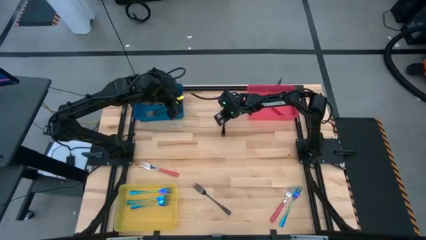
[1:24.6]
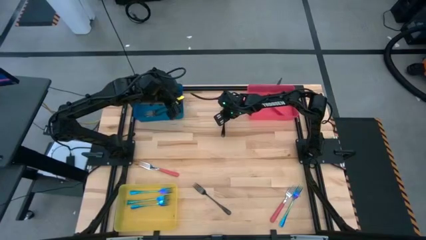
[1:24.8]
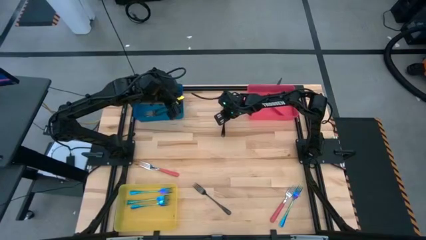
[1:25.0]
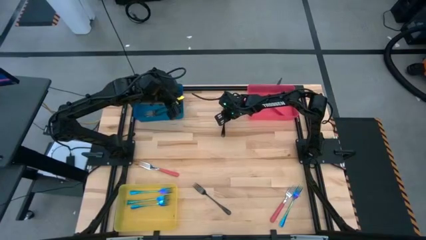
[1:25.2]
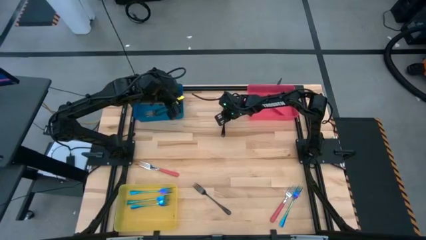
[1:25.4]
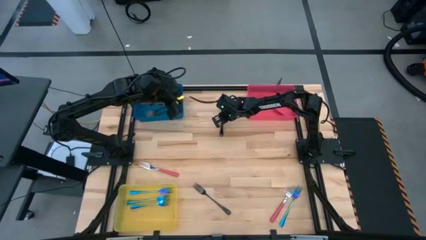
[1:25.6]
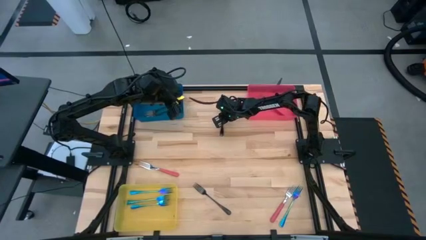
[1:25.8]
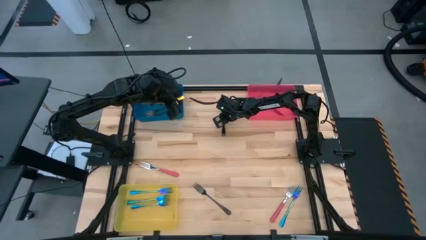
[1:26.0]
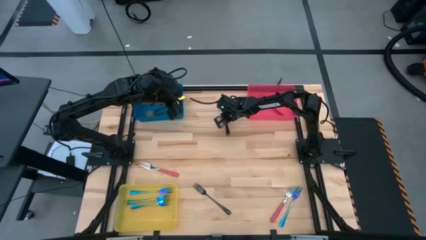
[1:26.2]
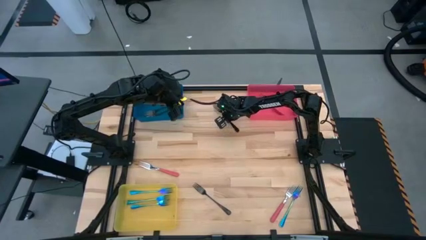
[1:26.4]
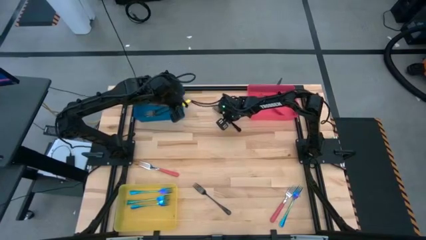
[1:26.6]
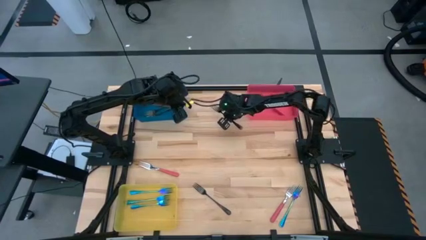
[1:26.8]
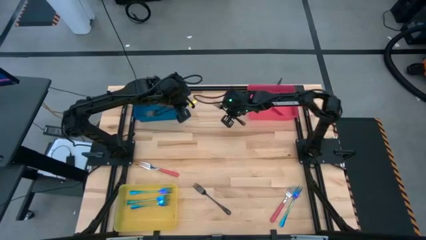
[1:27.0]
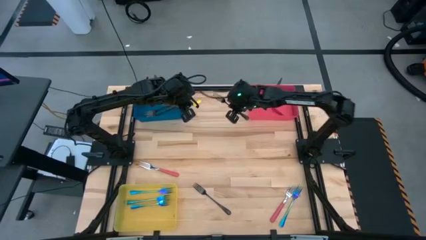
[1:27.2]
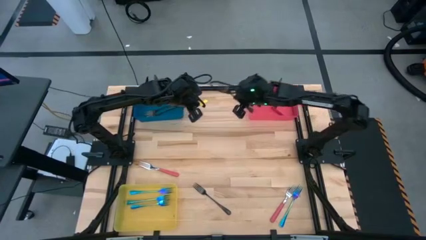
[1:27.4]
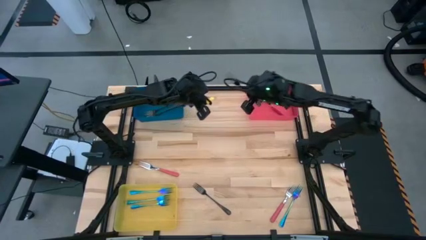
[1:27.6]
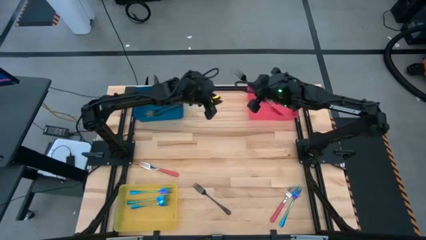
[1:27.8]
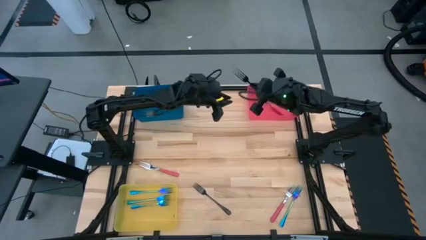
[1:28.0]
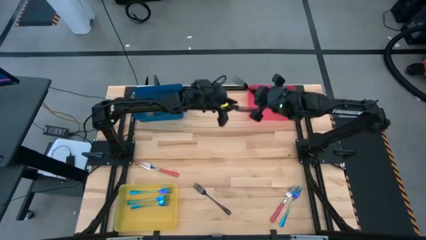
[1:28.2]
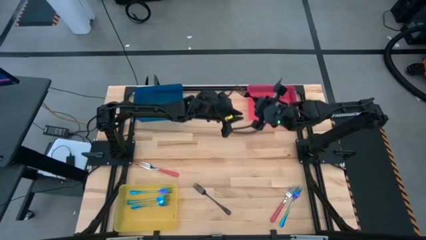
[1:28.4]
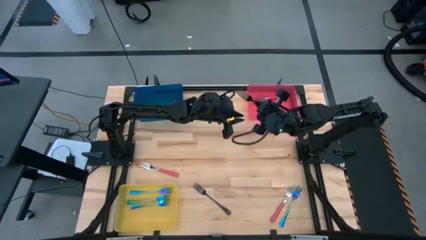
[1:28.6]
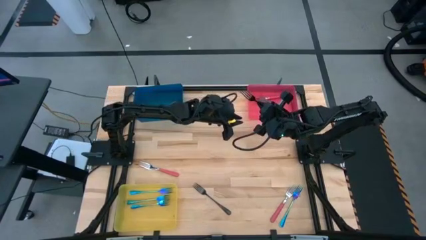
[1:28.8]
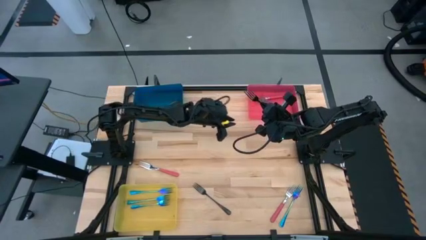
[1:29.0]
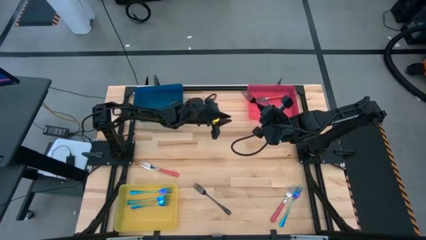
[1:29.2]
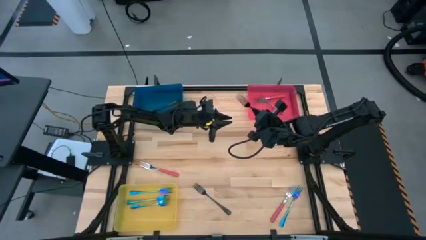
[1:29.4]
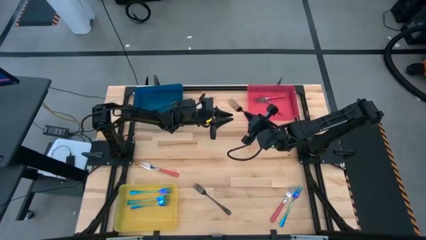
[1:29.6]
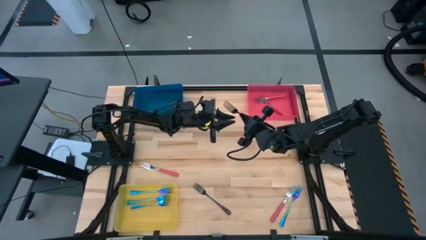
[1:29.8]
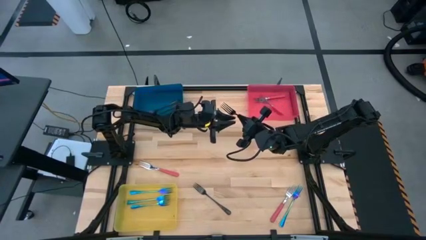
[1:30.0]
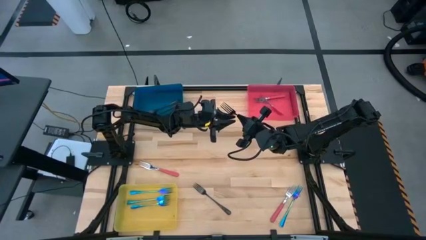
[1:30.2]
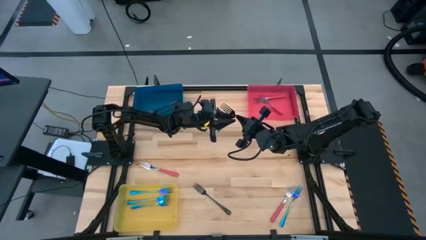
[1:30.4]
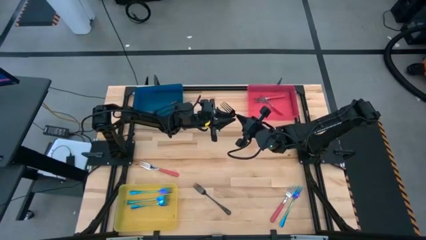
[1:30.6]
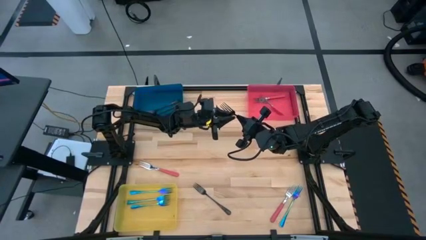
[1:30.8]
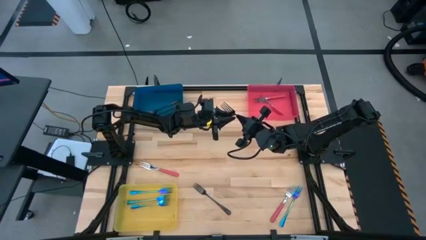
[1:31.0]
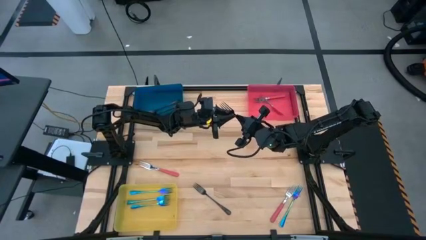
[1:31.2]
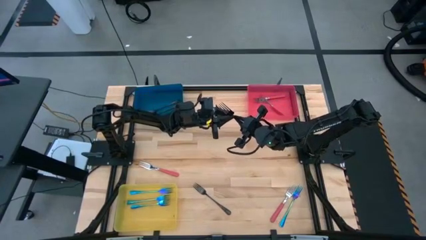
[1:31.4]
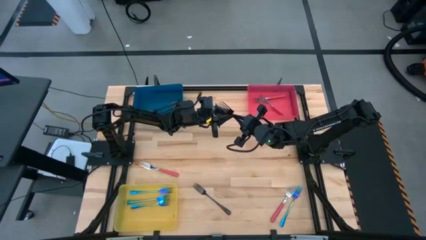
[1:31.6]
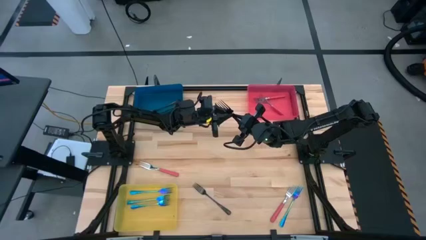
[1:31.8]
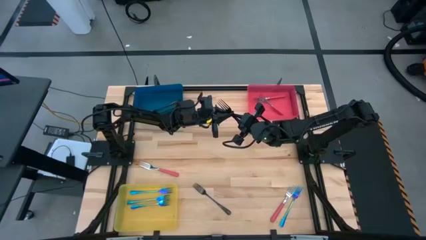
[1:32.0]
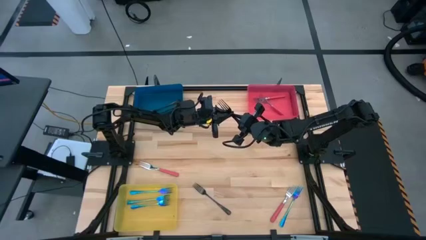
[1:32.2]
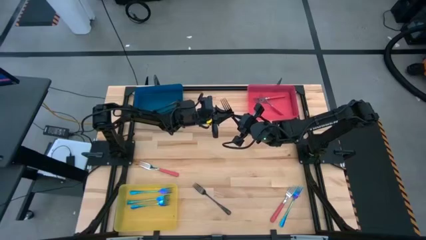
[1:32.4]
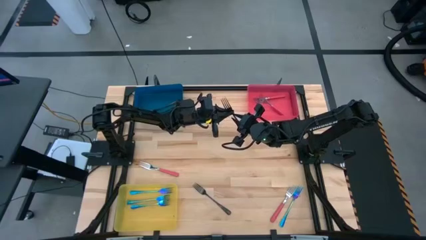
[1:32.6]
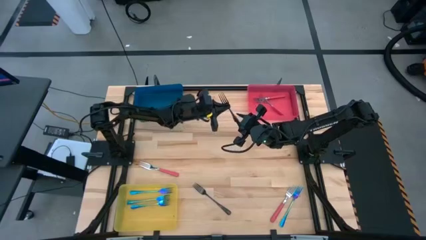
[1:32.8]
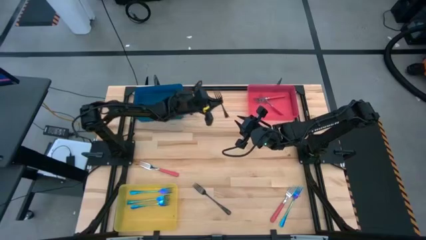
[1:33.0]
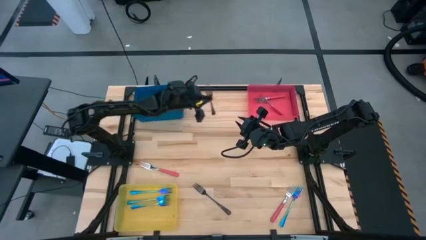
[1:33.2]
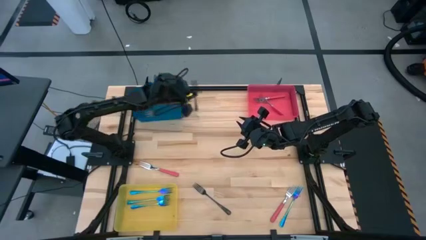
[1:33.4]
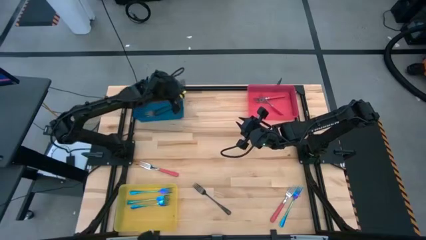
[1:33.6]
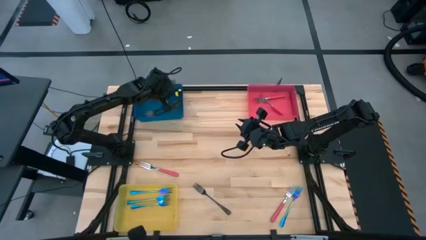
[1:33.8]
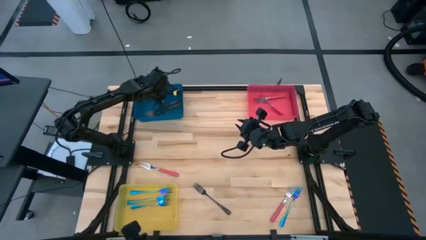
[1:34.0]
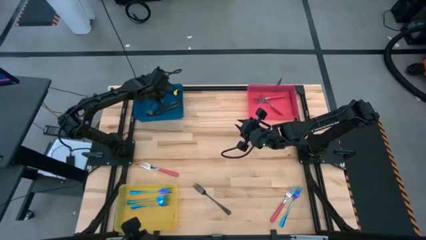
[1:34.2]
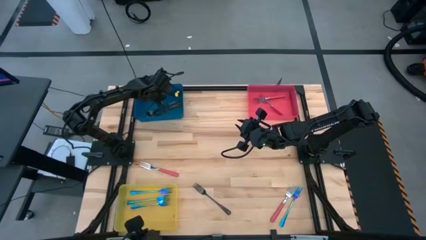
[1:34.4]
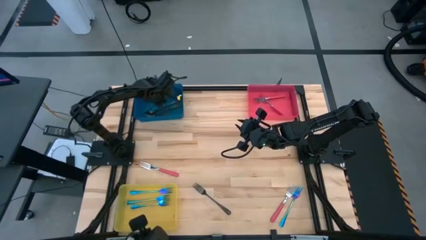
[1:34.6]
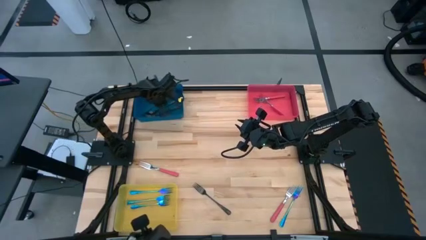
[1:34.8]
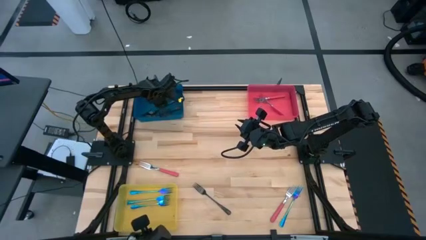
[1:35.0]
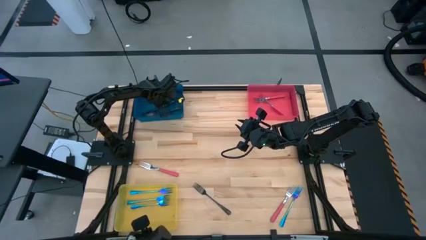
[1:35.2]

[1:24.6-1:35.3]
Task: Sort silverware by color (type)
Put the top black fork into the blue bin

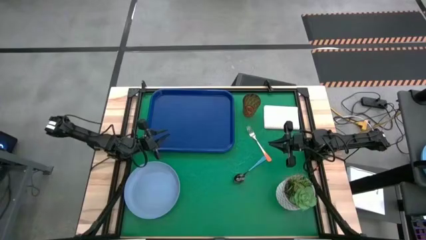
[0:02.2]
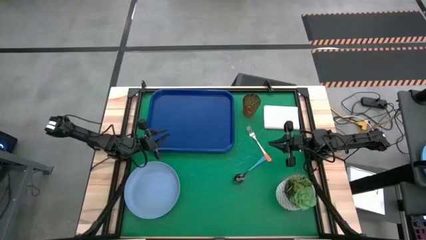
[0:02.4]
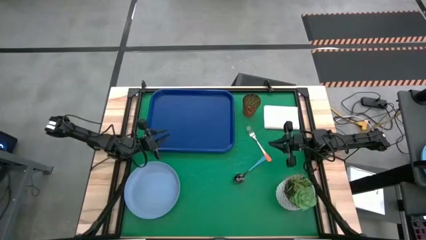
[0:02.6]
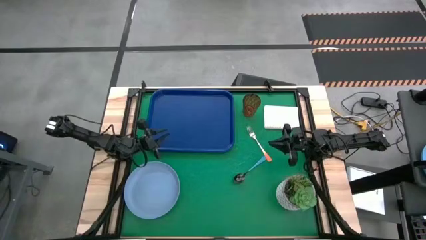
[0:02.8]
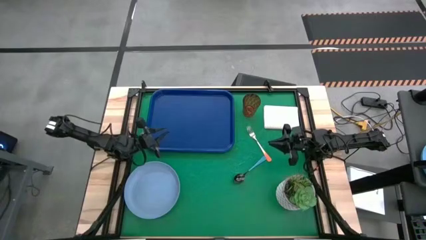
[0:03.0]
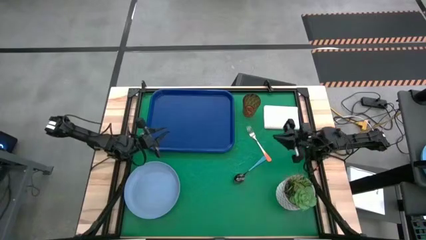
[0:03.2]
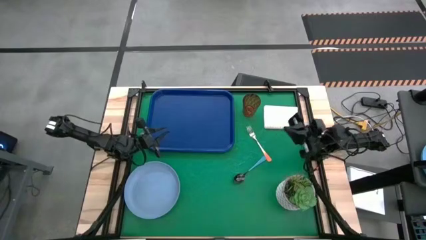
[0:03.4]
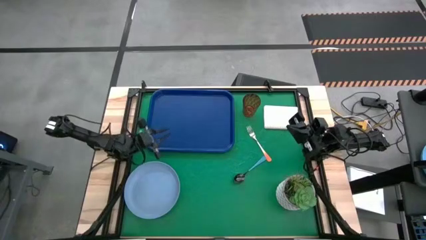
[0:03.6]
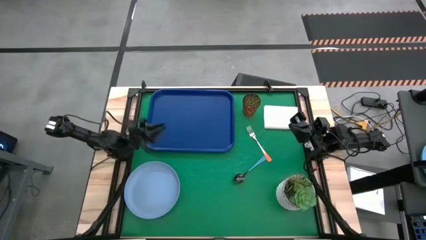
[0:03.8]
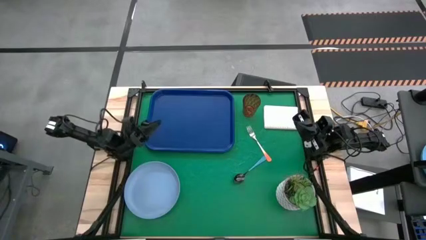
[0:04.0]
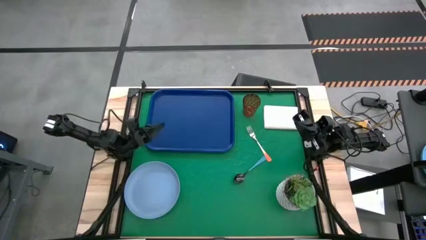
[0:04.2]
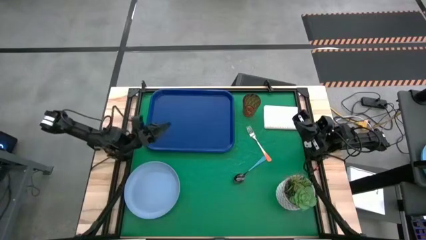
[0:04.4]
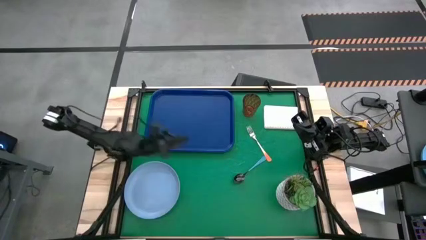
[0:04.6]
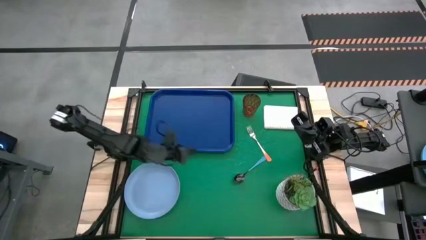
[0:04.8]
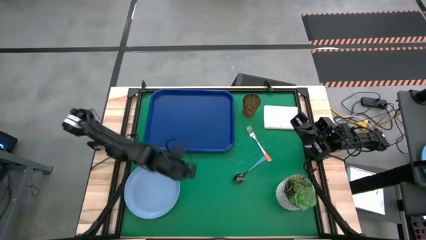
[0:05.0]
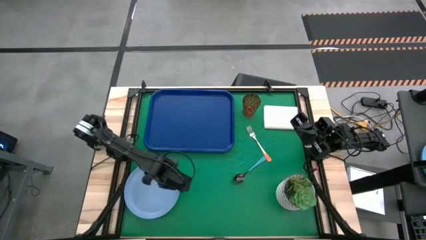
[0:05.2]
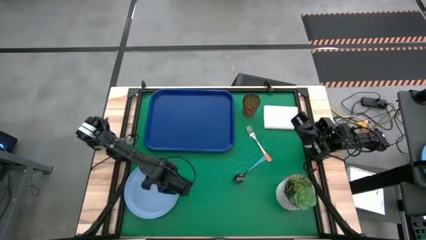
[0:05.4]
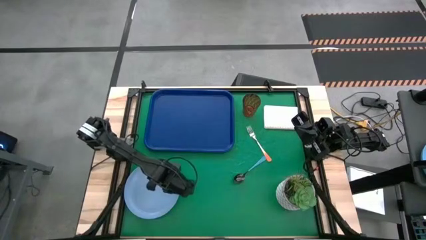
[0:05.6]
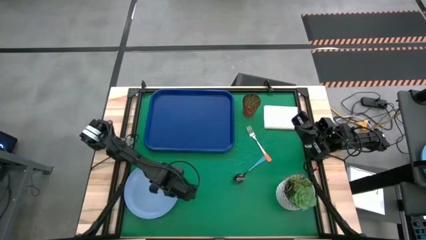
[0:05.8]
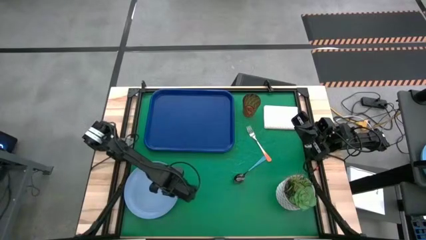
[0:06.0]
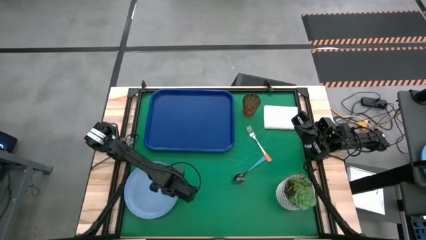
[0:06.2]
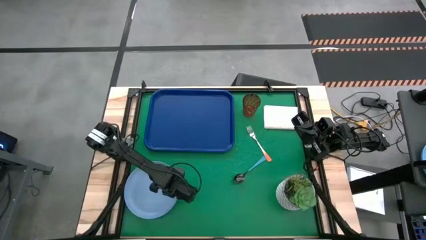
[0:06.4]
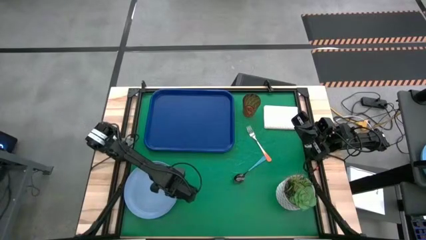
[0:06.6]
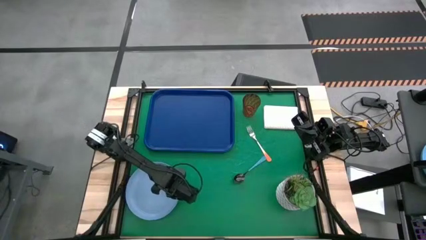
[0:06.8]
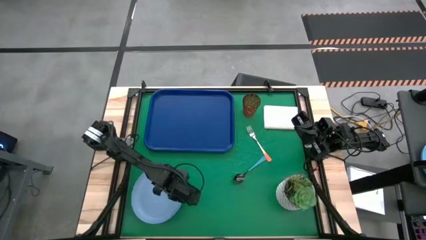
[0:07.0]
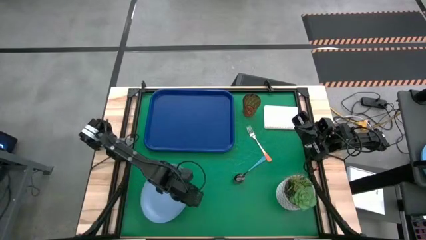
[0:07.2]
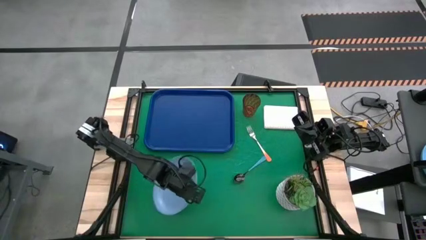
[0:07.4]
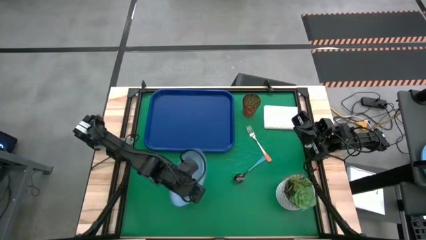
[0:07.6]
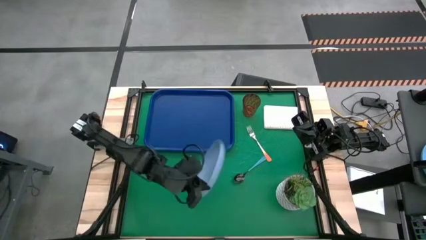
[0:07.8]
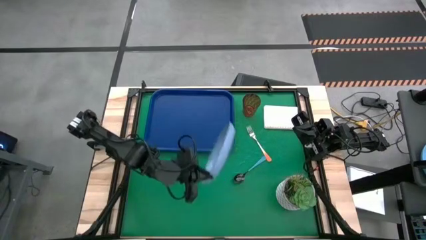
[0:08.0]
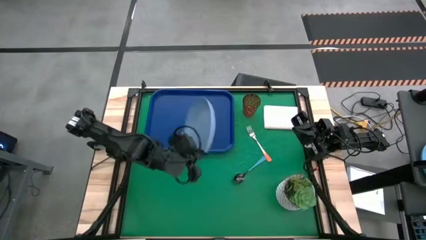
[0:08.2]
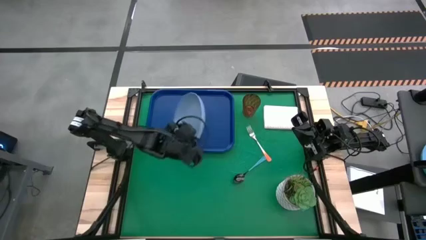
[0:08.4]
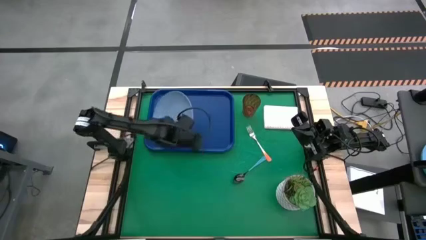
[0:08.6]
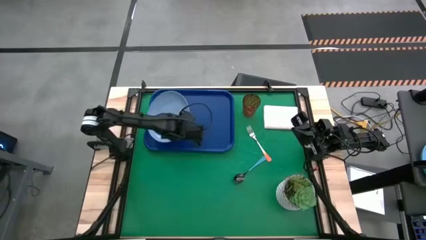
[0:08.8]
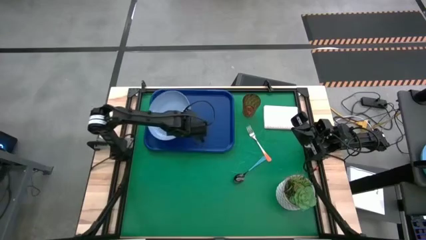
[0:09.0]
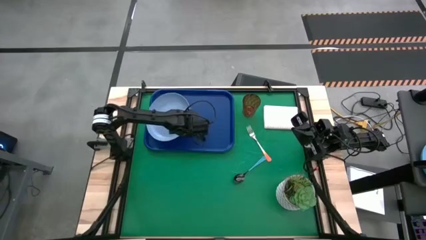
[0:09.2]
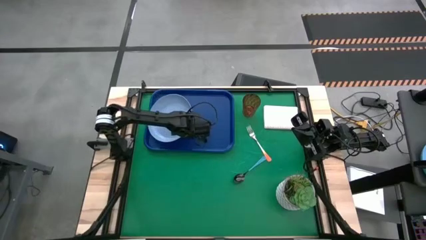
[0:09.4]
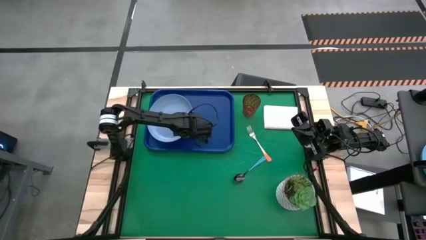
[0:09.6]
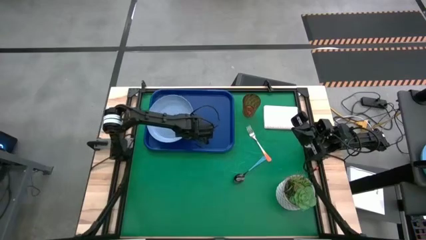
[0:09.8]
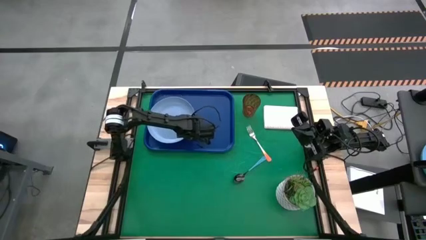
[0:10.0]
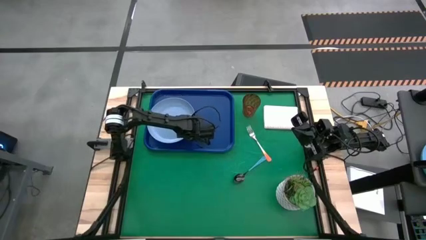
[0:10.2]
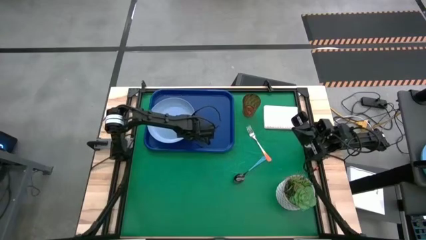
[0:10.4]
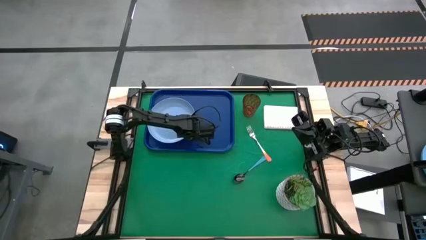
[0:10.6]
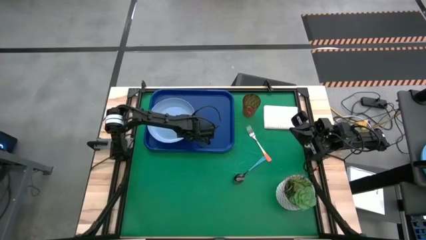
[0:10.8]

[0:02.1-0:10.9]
Task: Pick and place plate/cup/fork/spoon on tray
Put the blue plate on the blue serving tray
